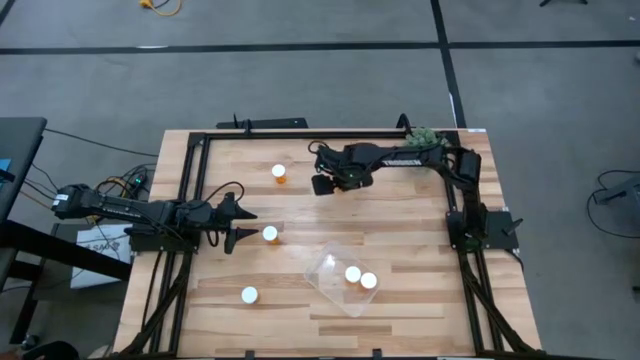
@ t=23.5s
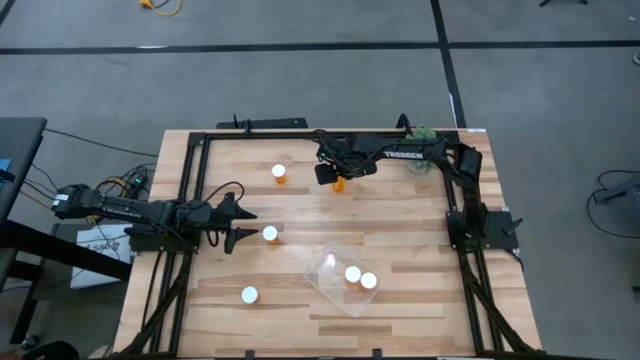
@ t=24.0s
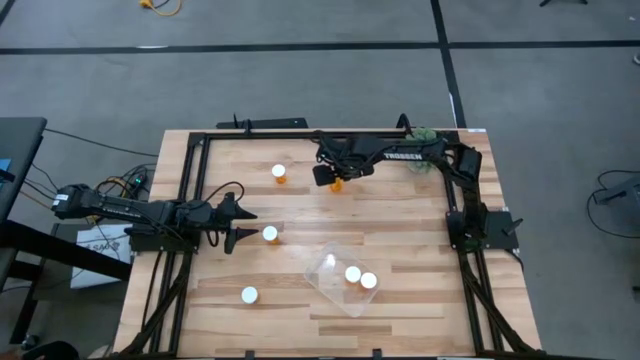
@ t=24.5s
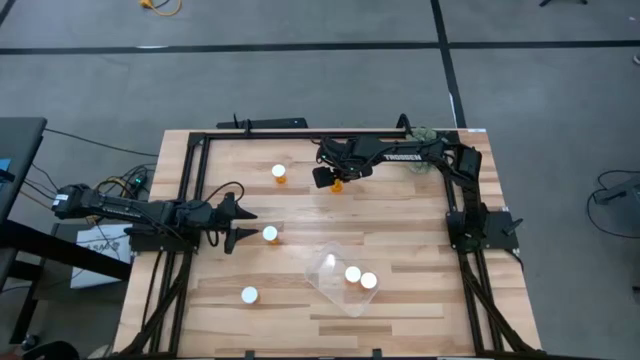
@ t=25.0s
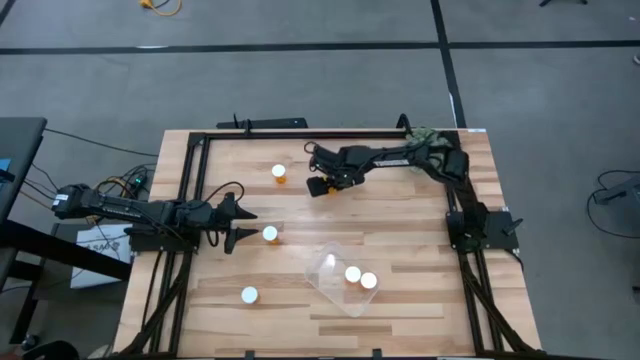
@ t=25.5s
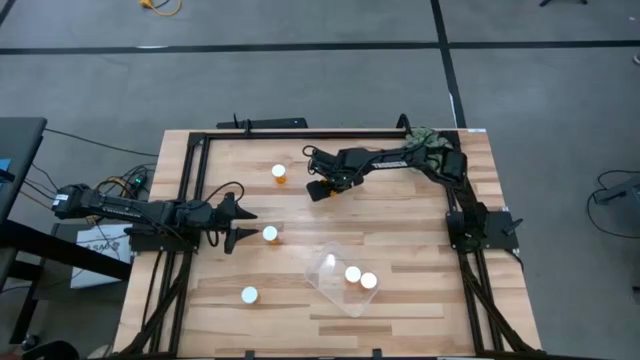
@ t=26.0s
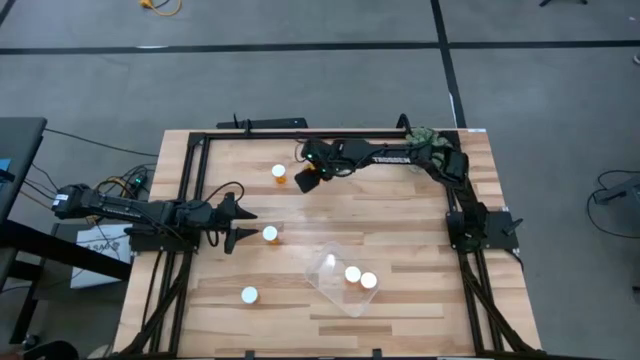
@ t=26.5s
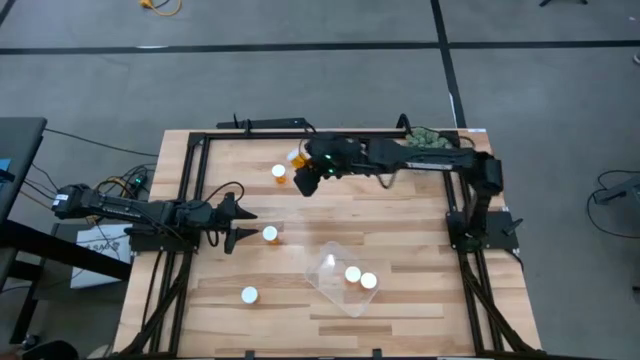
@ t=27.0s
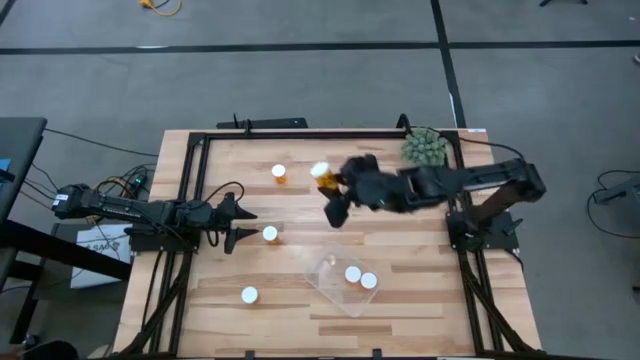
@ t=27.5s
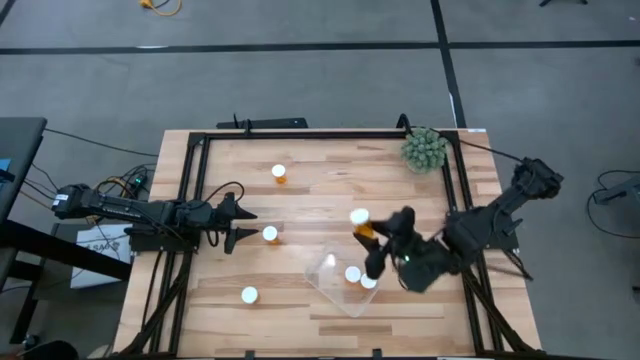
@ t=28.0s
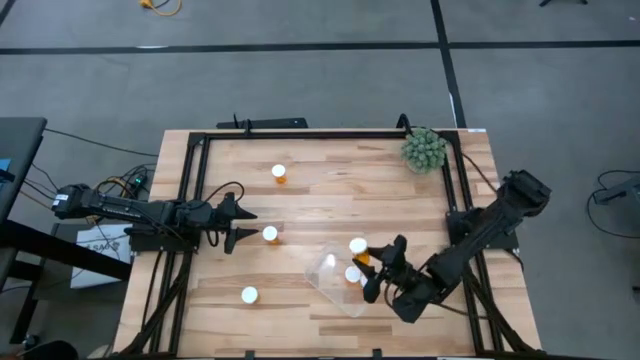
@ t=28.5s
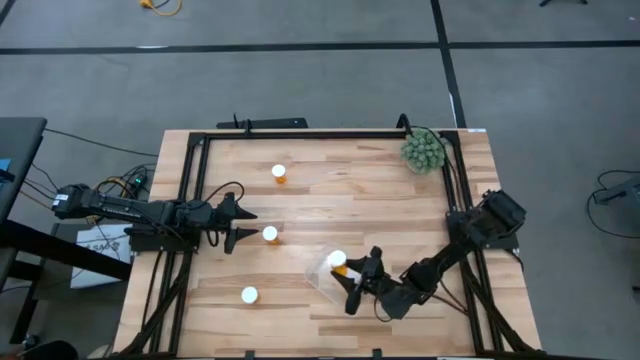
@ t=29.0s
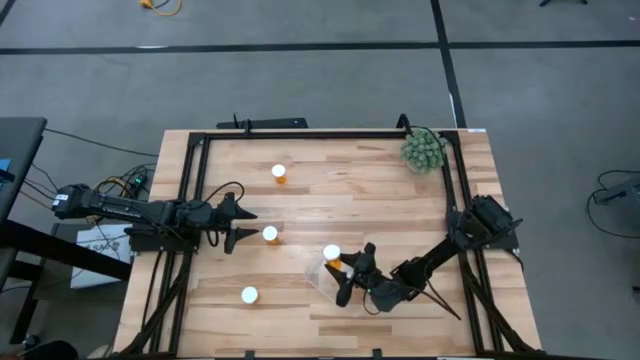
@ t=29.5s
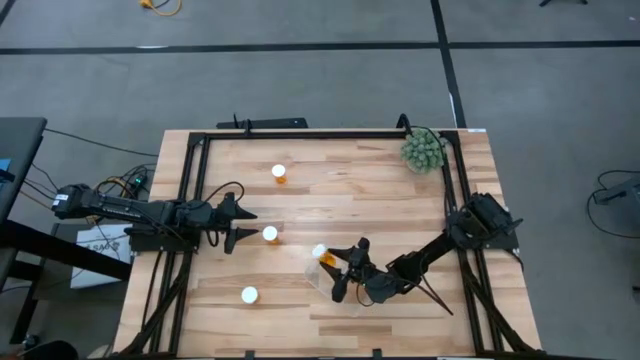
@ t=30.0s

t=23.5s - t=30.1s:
Task: Pick and place pill bottles into a basket
Put the orange pill bottle into the transparent container

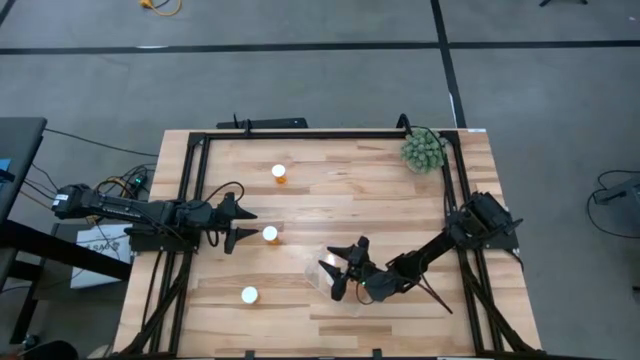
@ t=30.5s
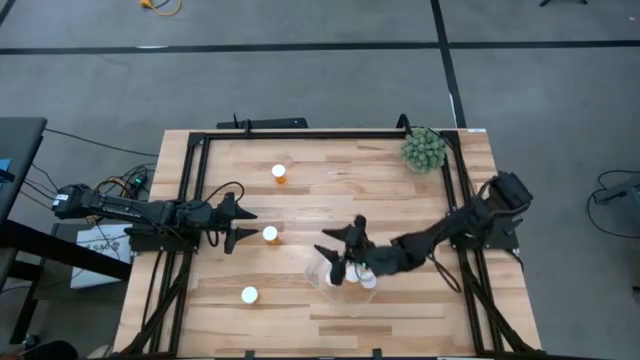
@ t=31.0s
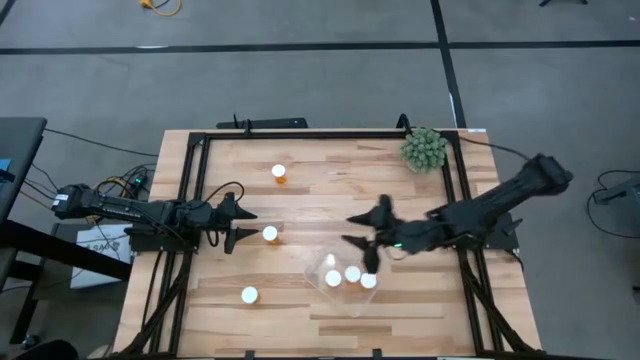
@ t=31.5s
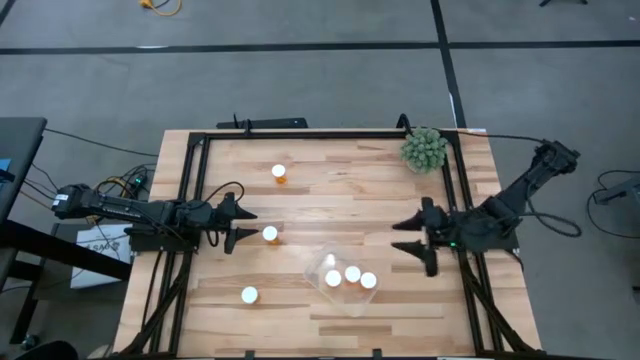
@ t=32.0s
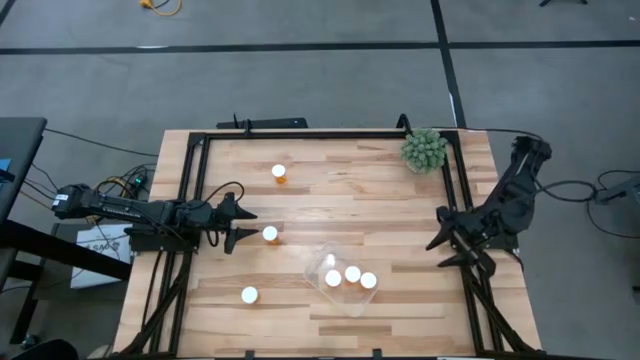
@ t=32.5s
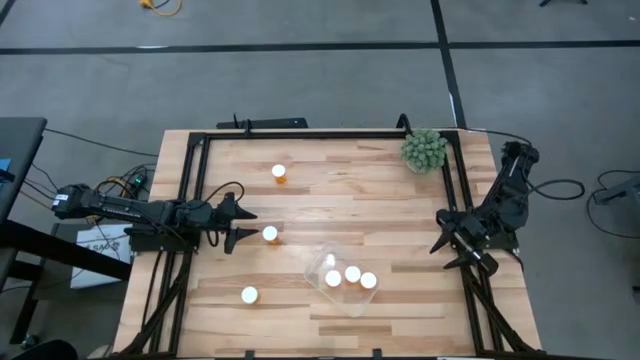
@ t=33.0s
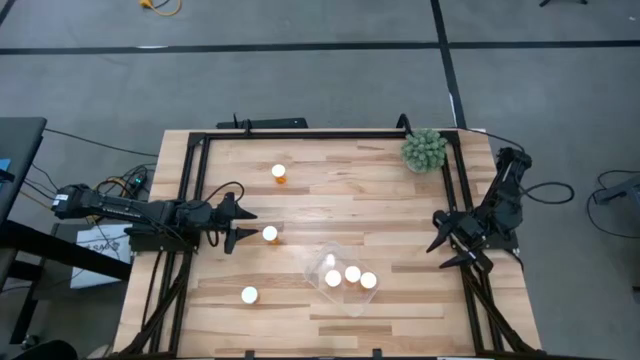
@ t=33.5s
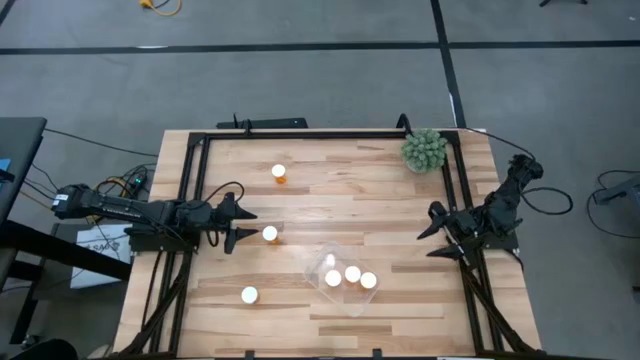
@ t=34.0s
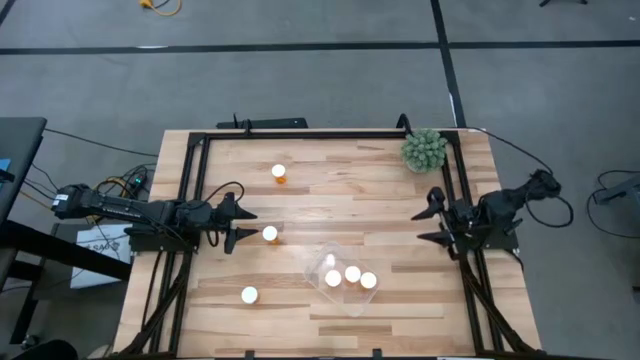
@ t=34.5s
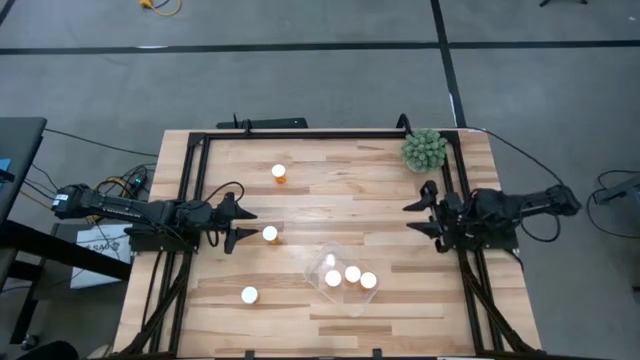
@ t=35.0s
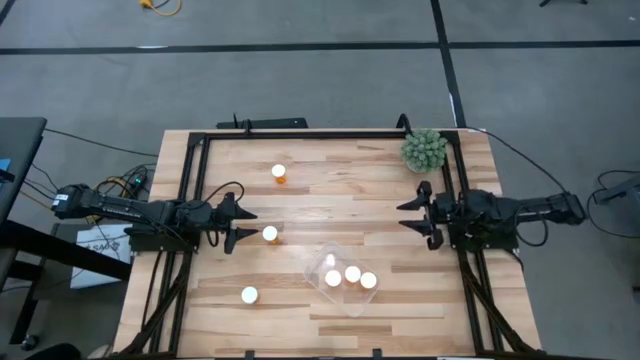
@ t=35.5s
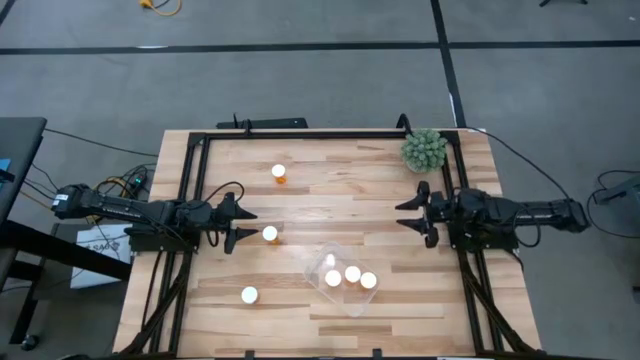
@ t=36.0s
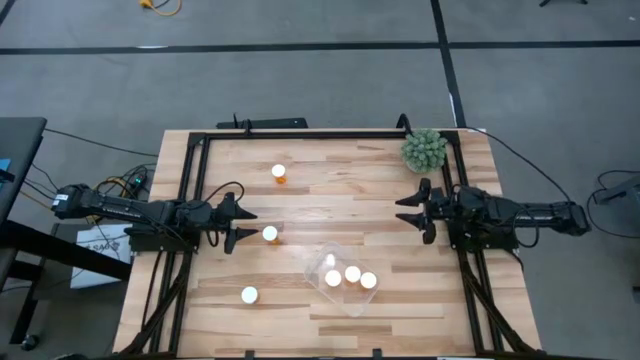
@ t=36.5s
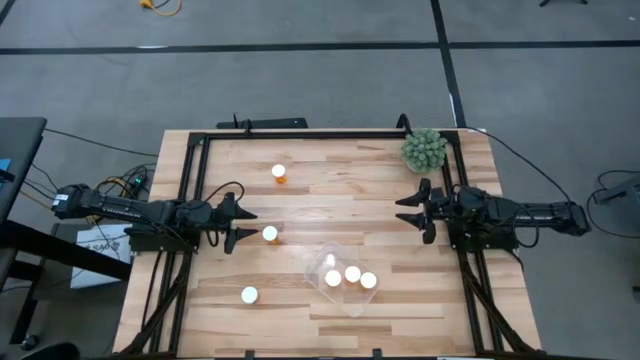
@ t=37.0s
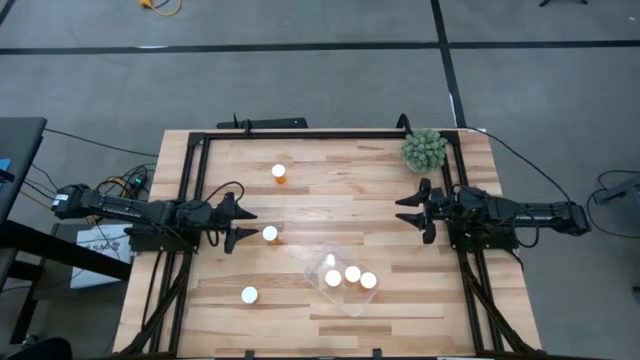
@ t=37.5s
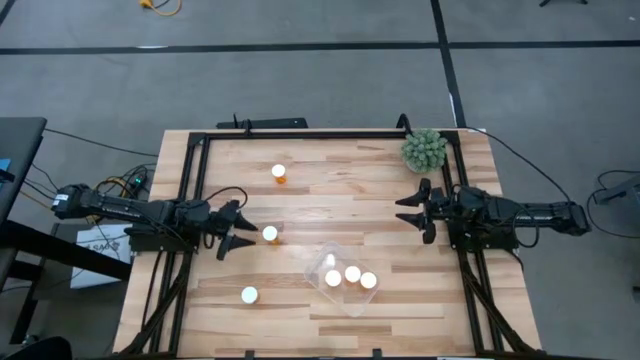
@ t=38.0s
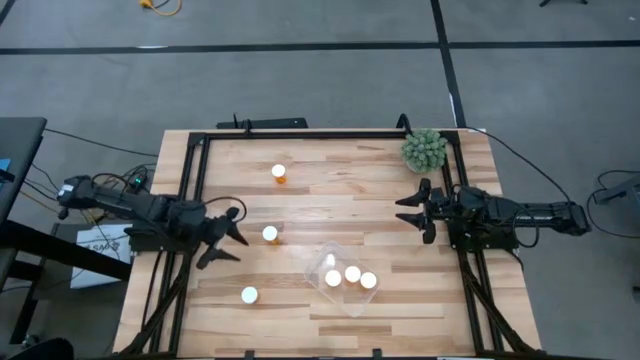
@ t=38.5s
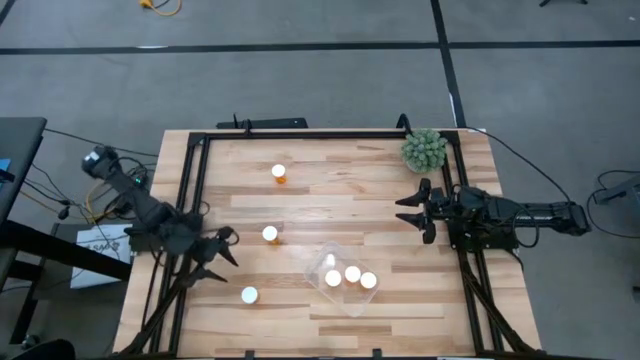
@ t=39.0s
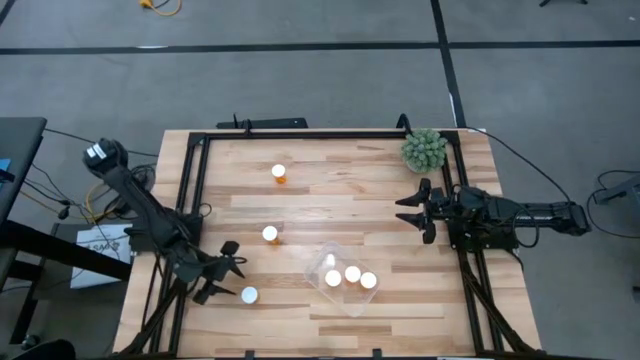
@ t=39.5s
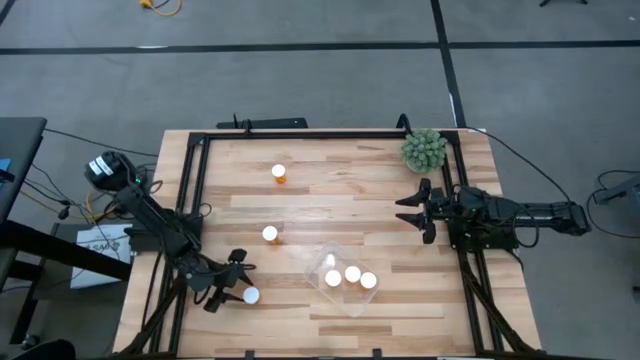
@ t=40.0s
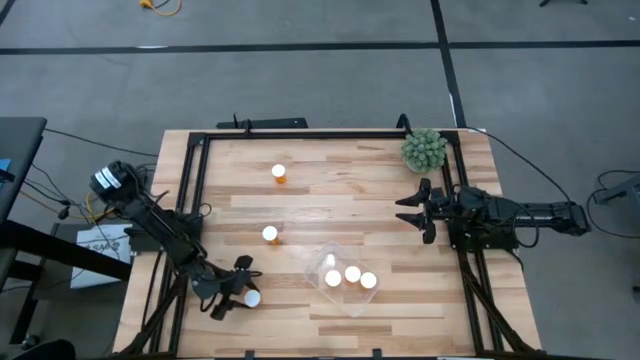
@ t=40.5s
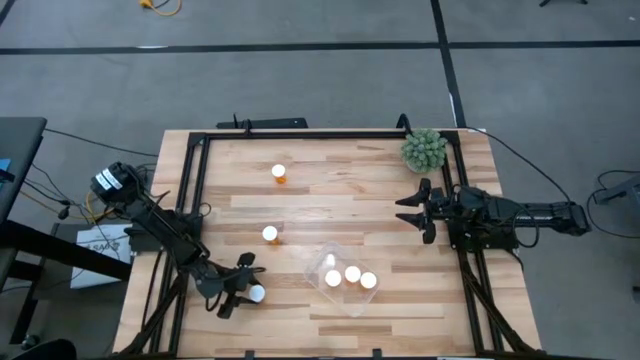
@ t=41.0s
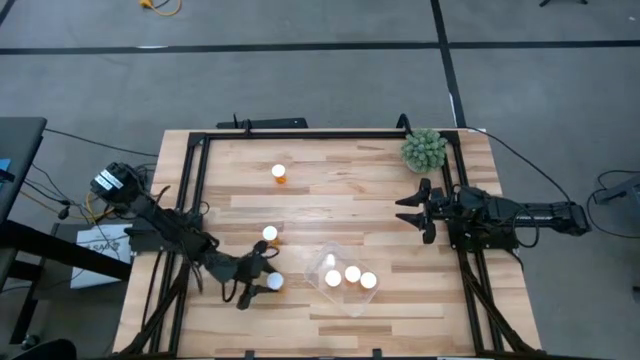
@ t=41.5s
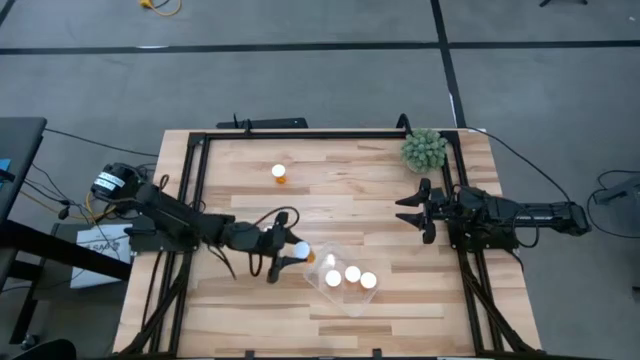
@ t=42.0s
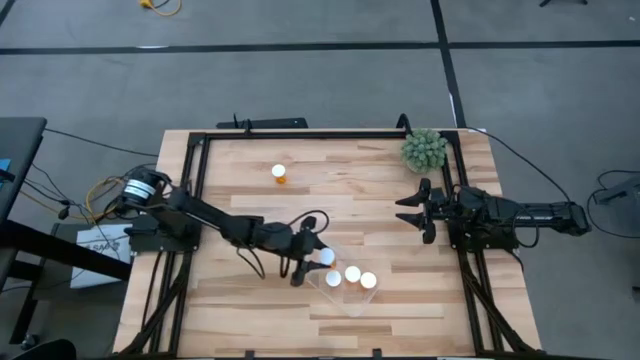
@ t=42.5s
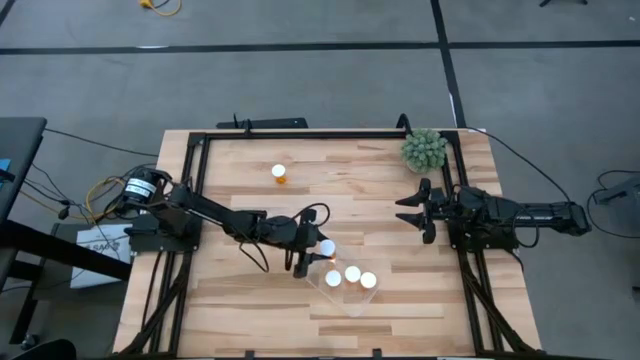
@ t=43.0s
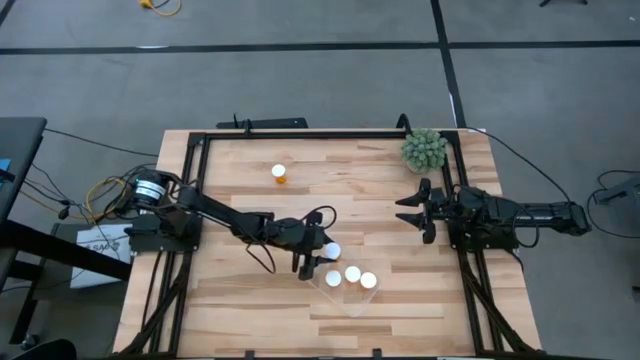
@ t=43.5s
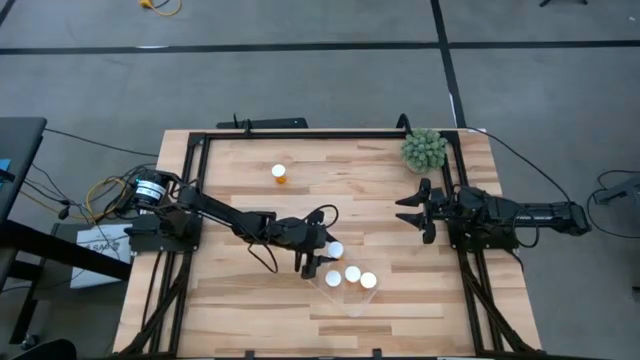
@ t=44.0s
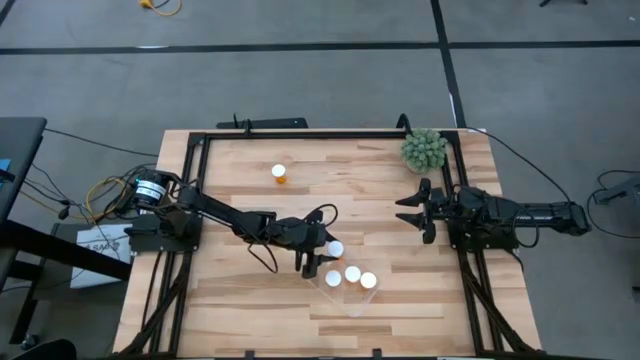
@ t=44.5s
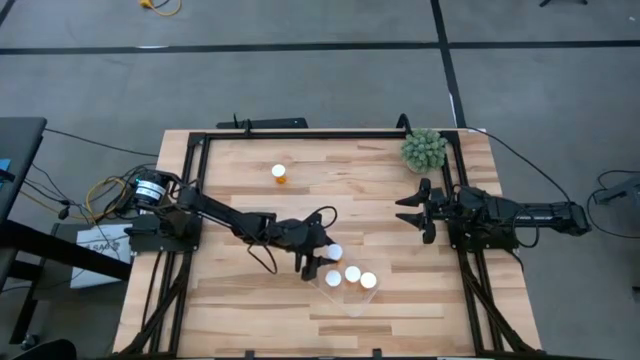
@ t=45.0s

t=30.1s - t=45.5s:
Put the orange pill bottle into the transparent container
